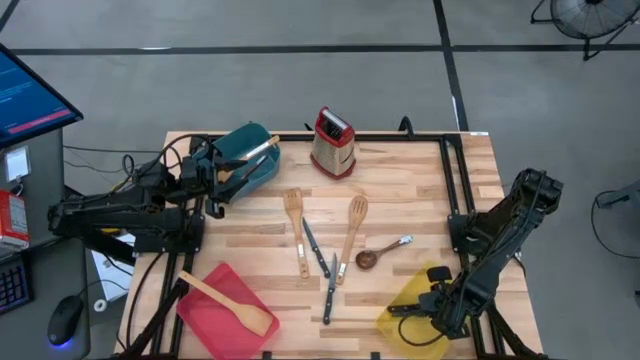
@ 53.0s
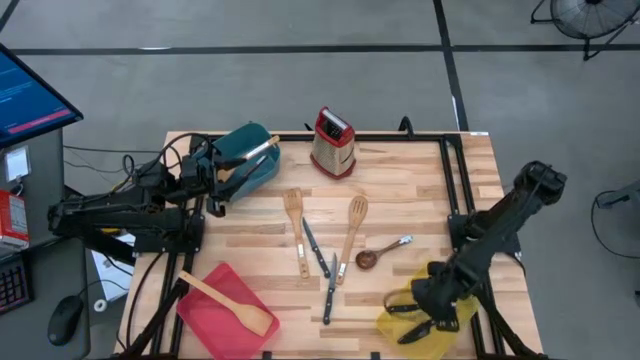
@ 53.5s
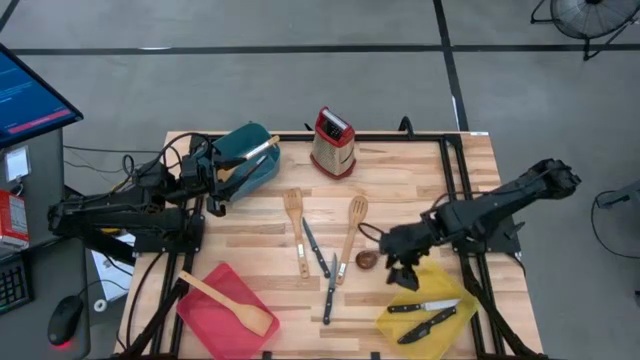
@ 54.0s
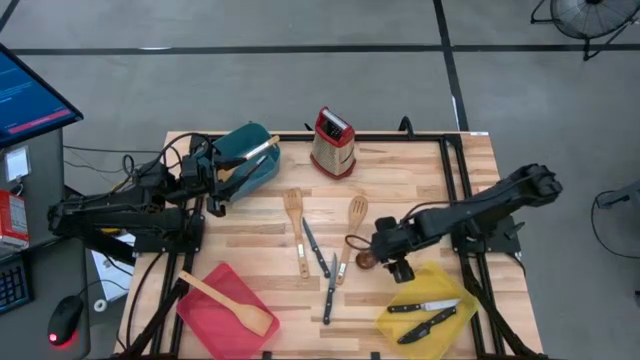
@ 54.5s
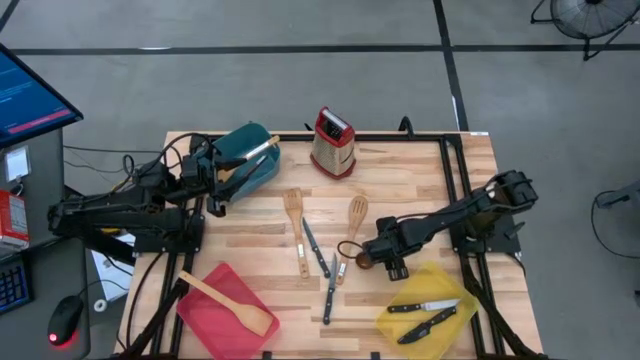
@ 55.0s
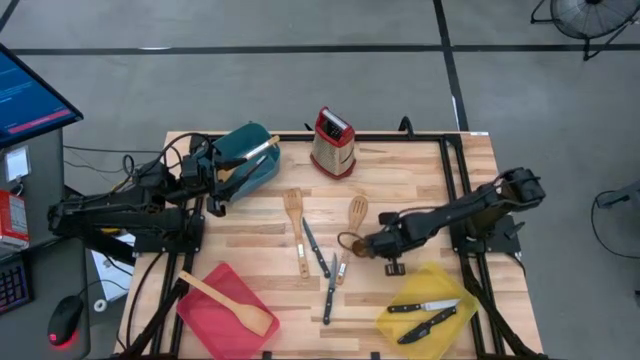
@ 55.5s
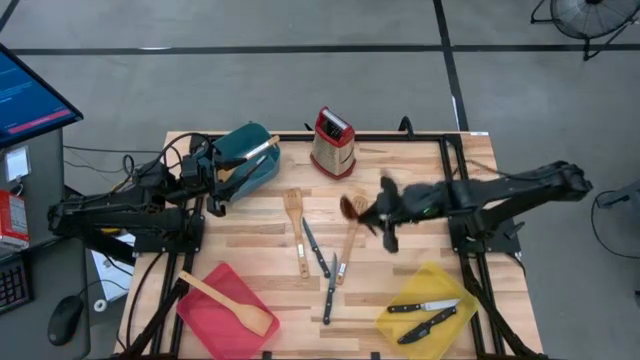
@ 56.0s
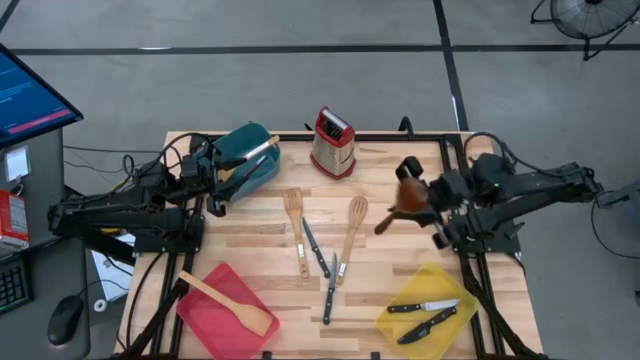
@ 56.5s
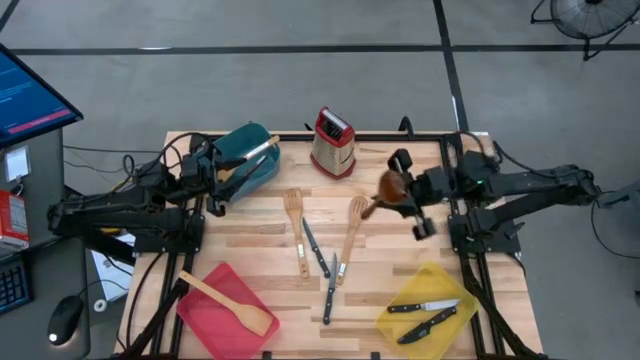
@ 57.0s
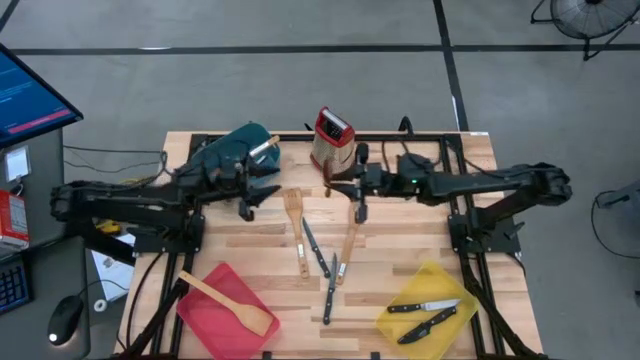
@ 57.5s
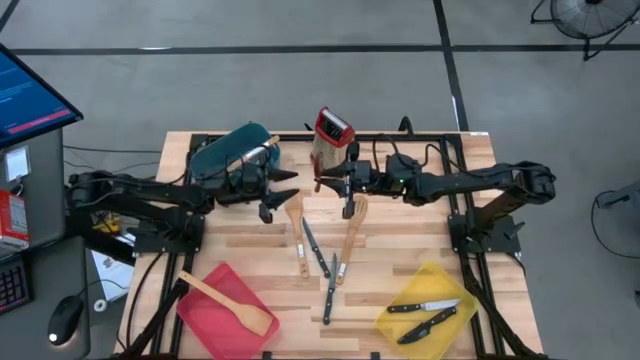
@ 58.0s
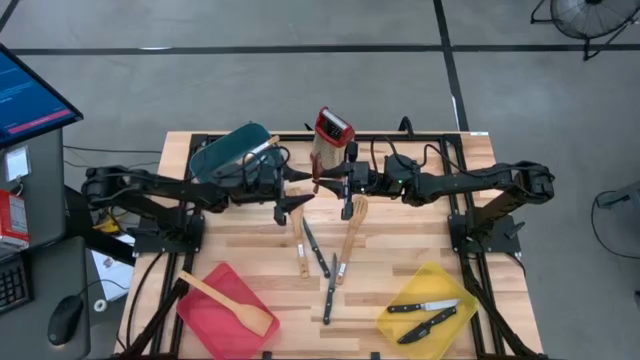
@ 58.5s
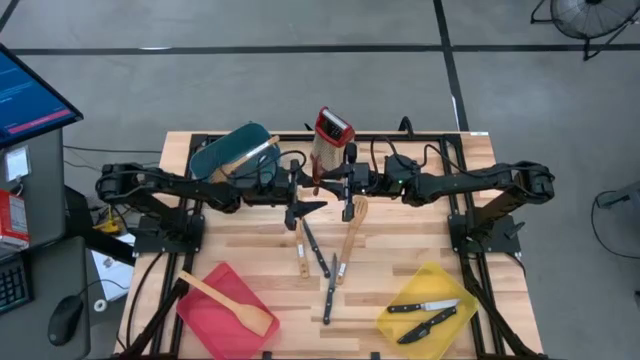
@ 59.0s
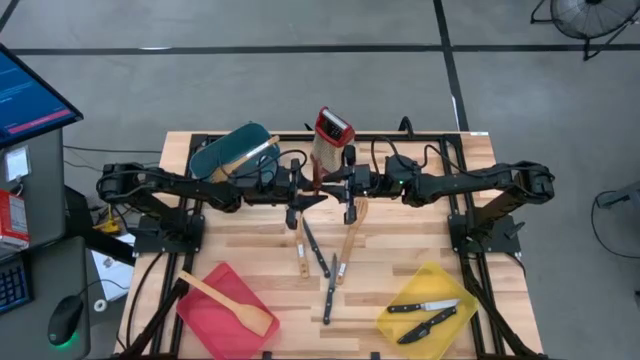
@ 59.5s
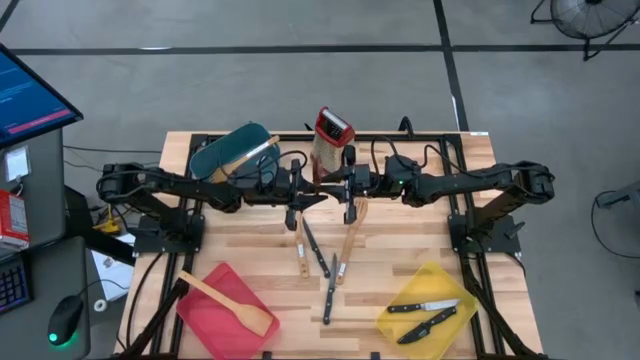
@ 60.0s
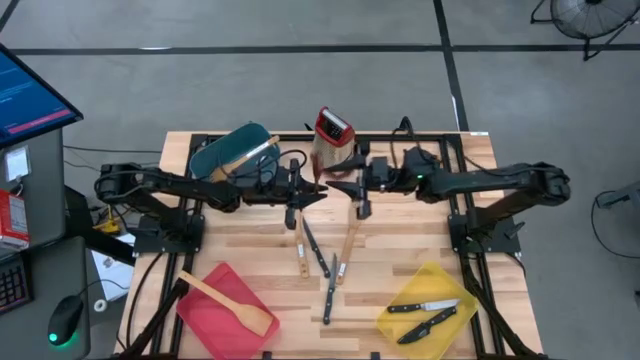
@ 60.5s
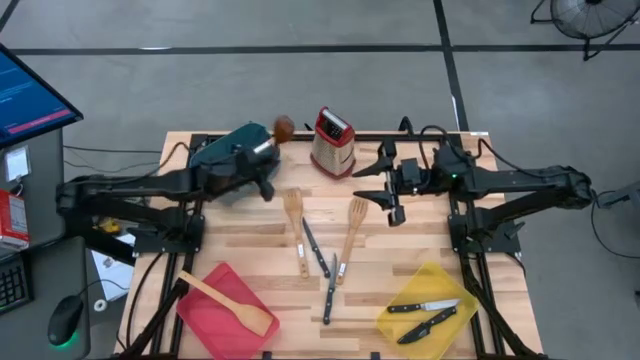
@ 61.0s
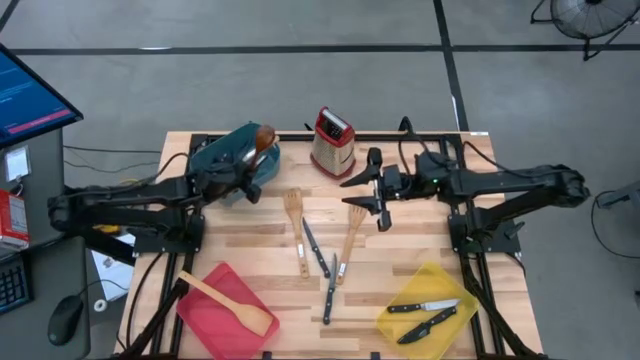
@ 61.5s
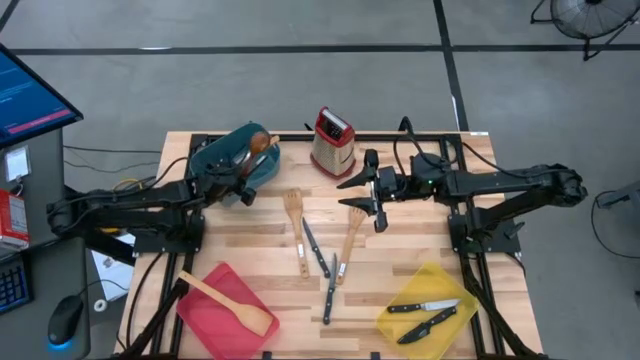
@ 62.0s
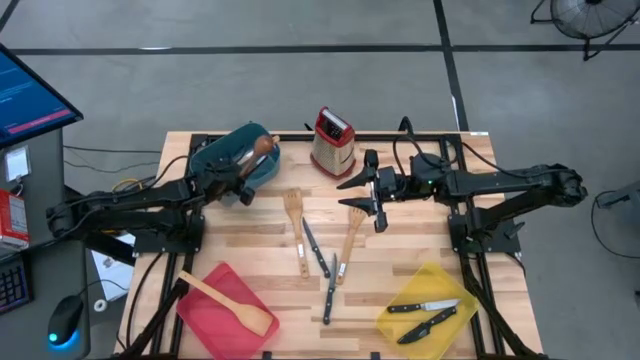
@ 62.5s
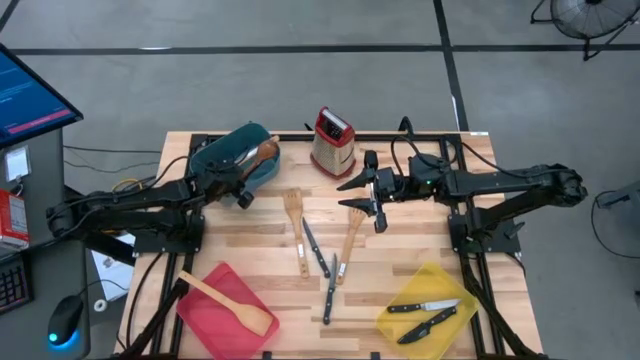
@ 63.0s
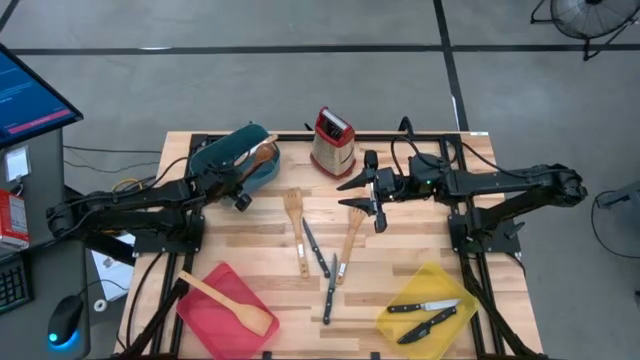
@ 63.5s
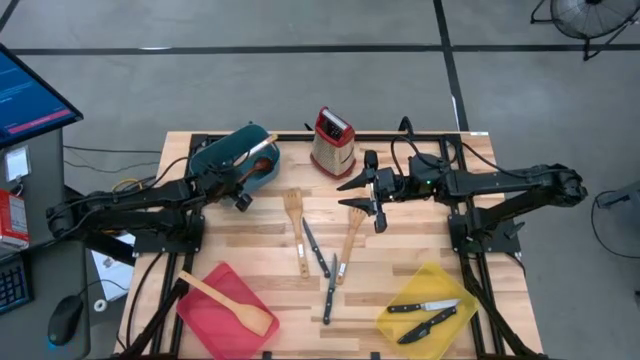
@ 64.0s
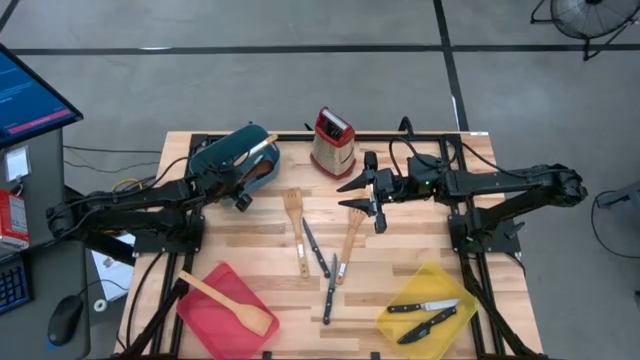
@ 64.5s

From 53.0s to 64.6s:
Task: Pick & Place Kitchen Items
Put the brown wooden serving spoon into the blue bin

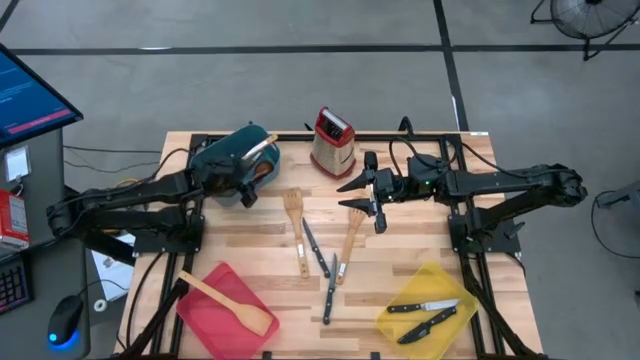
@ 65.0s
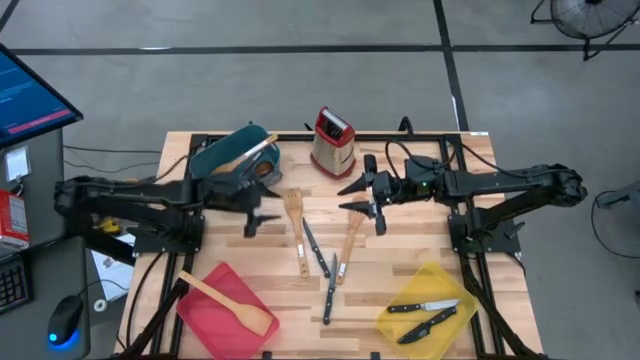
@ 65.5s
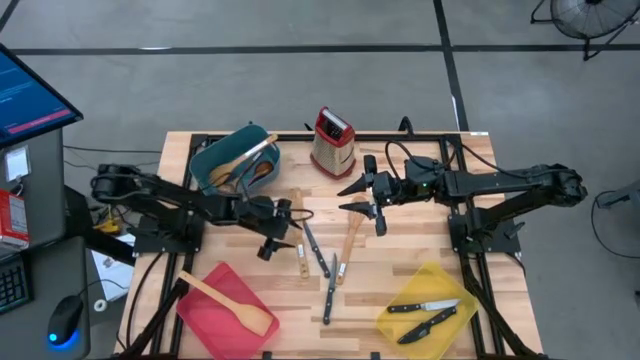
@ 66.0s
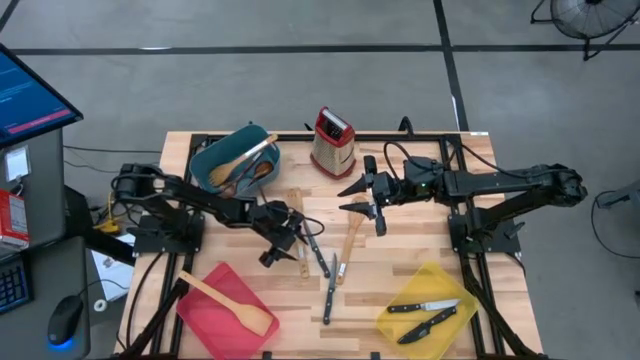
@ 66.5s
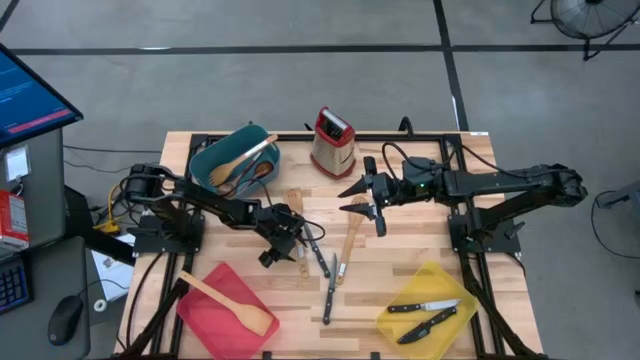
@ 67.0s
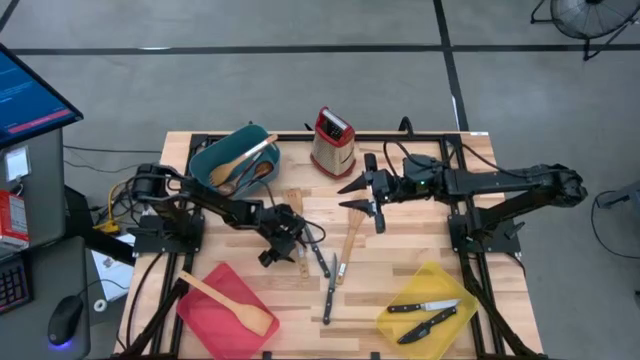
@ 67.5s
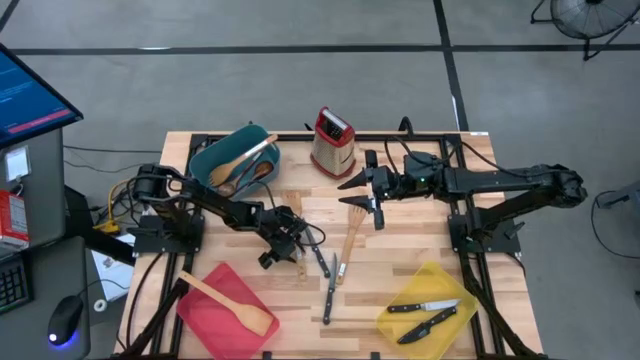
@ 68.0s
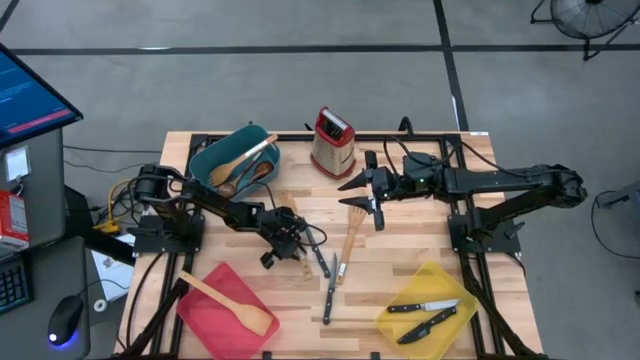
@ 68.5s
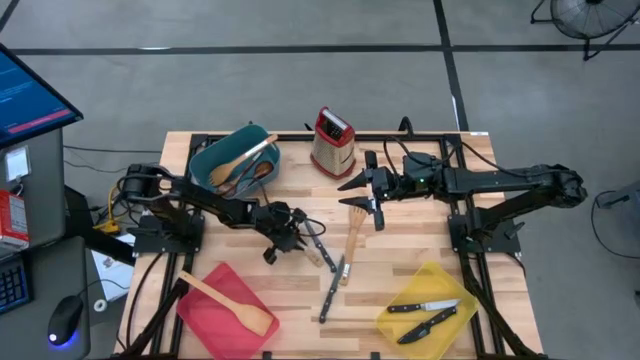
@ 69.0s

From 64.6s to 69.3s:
Put the brown wooden spatula into the pink bin

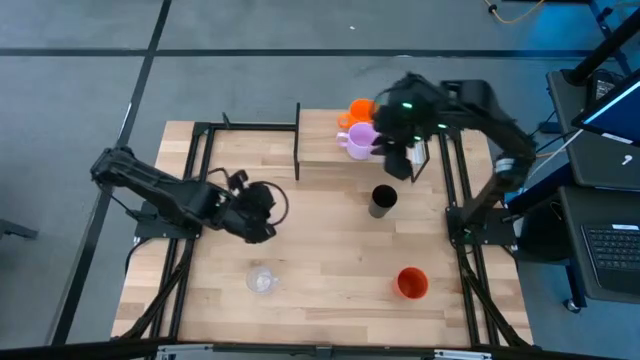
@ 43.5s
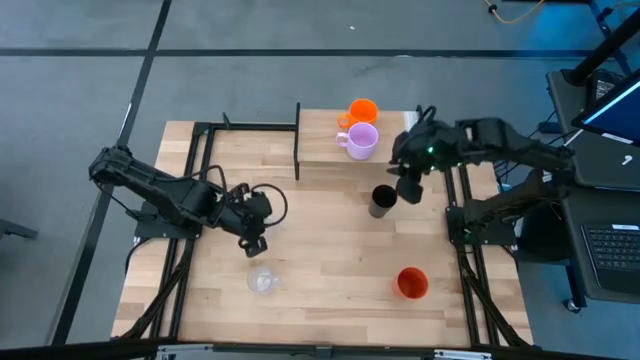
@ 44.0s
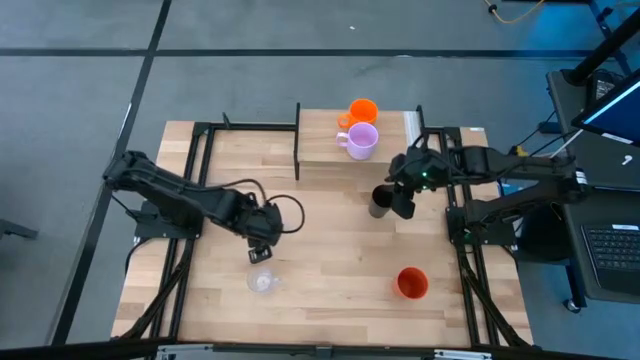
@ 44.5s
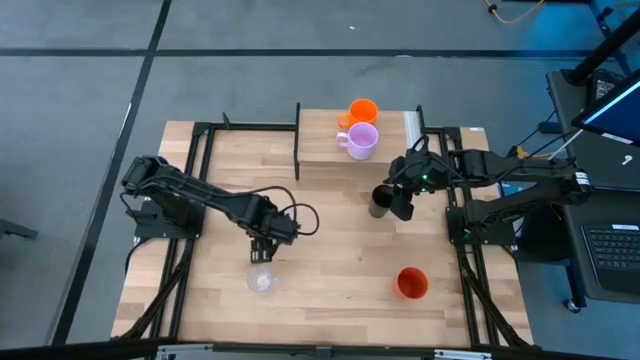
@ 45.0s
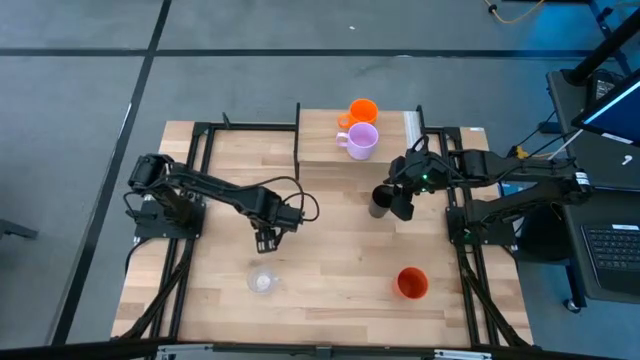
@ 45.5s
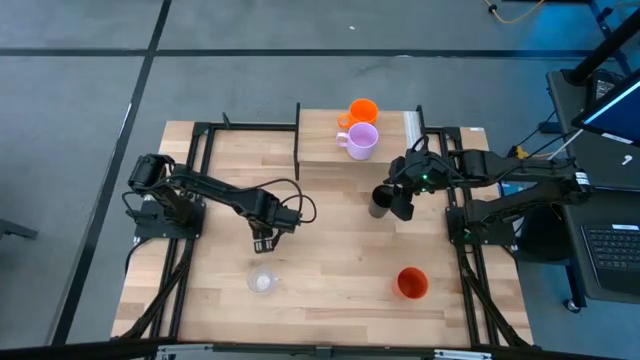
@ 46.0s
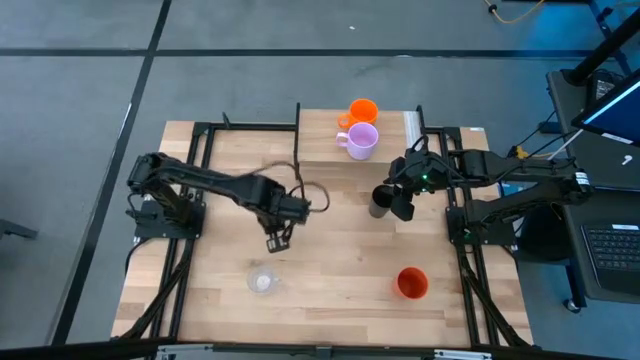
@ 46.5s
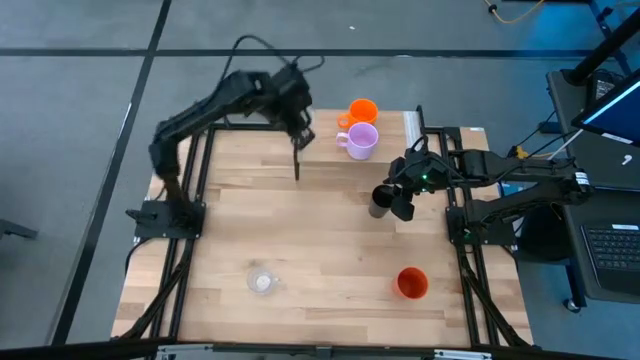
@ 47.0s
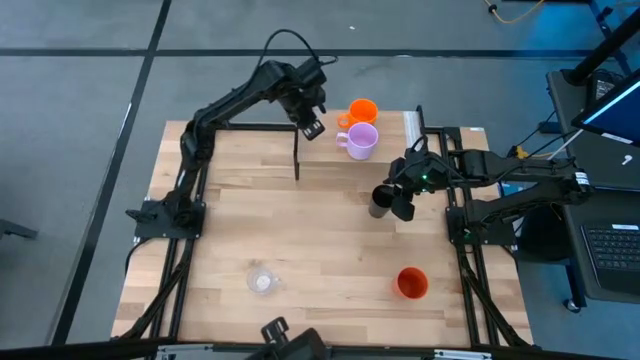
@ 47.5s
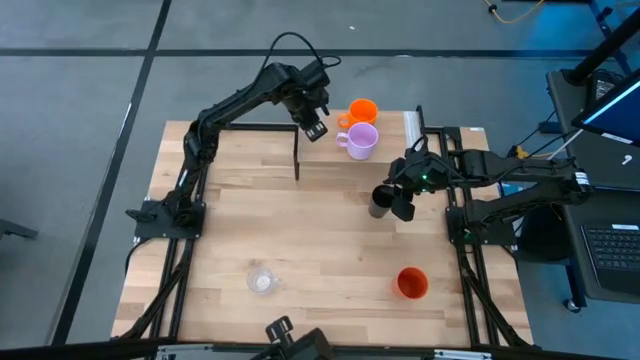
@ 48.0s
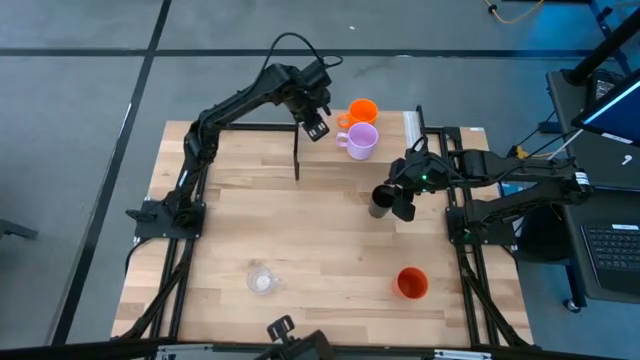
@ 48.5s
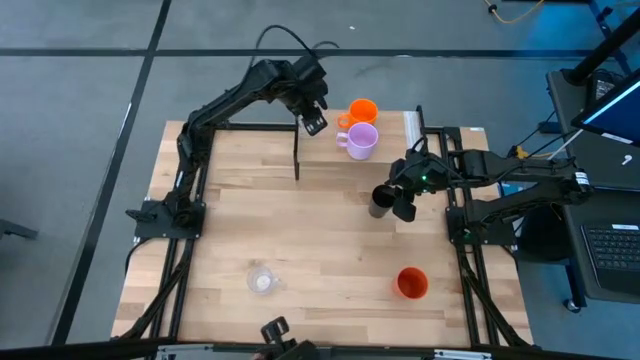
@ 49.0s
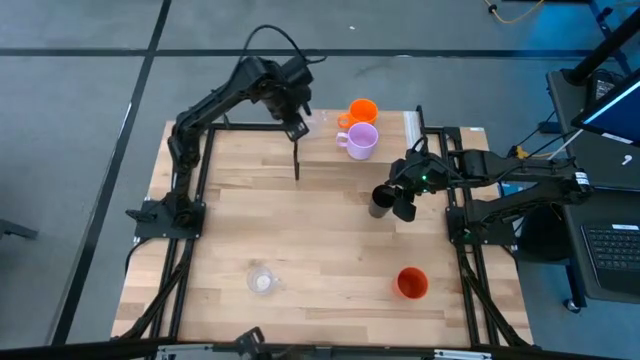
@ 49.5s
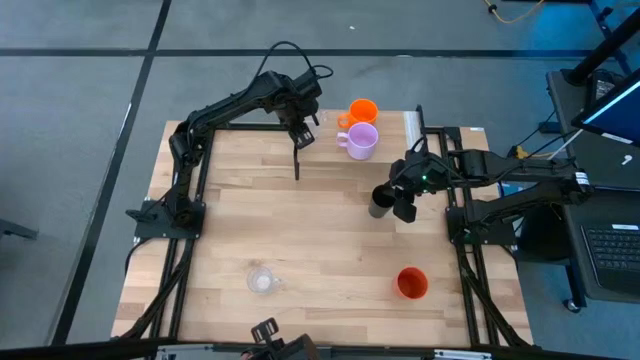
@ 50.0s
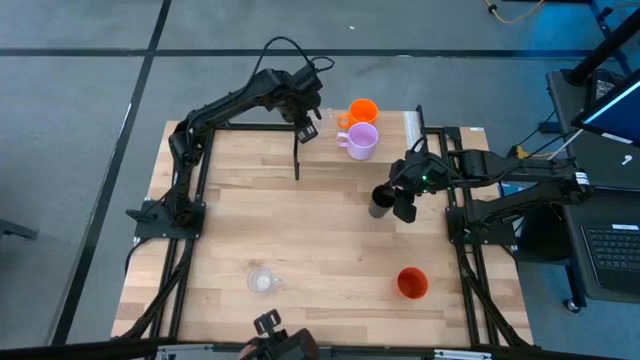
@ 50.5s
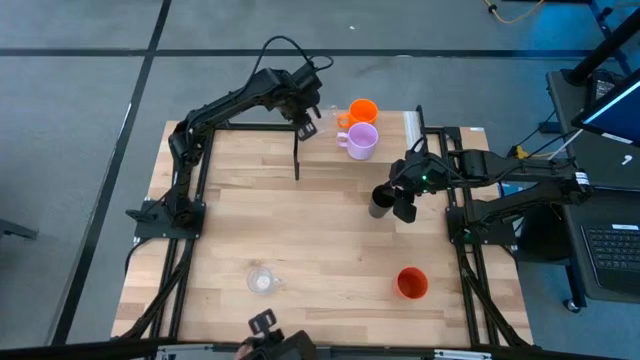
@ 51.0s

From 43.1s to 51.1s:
Task: Stack small to large cups/mugs on shelf
Put the top transparent mug on the shelf
